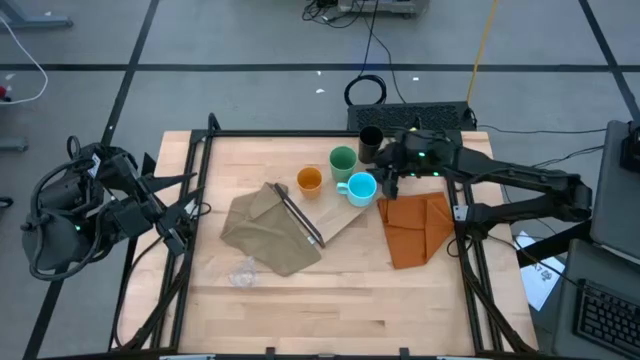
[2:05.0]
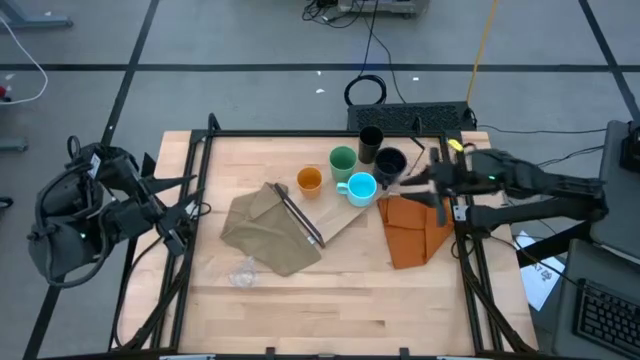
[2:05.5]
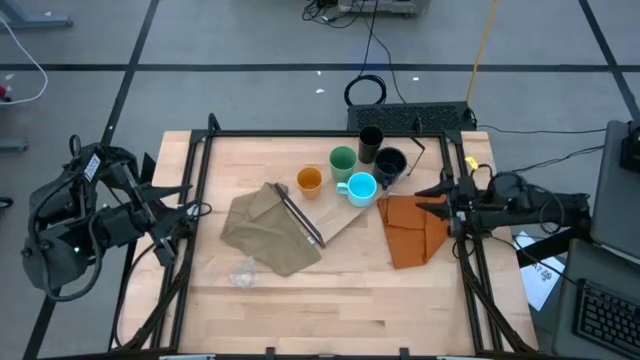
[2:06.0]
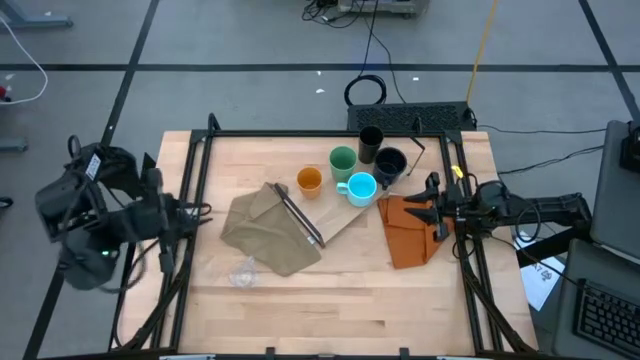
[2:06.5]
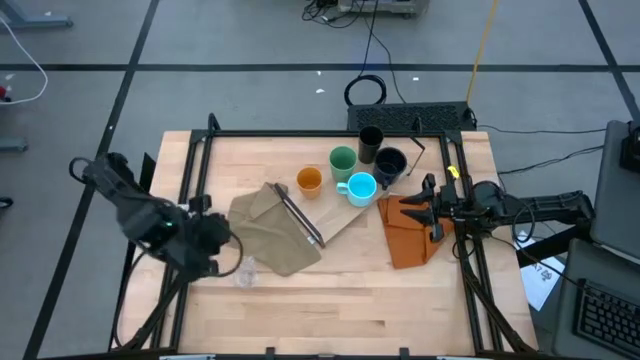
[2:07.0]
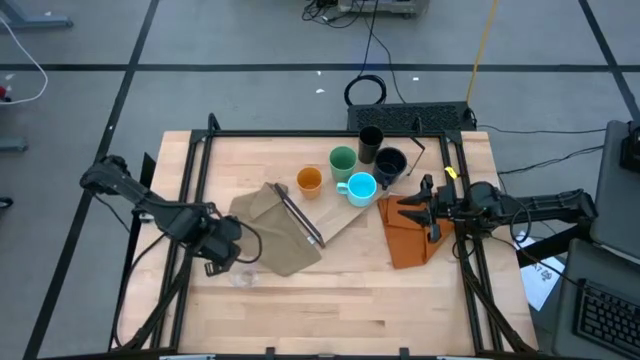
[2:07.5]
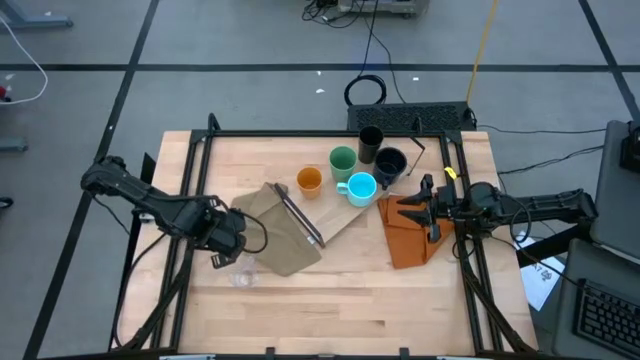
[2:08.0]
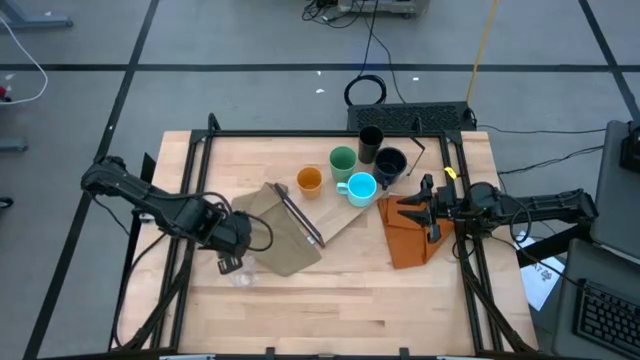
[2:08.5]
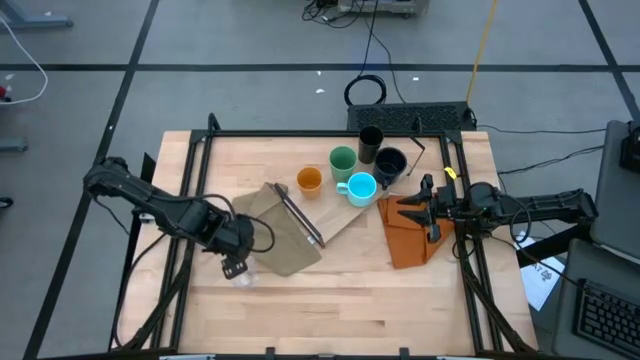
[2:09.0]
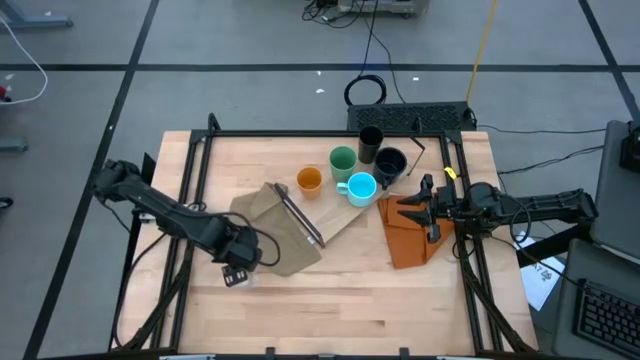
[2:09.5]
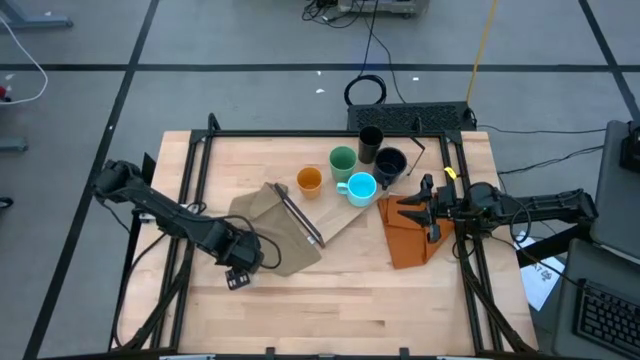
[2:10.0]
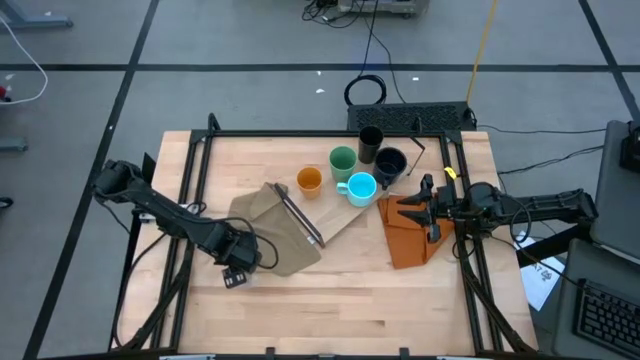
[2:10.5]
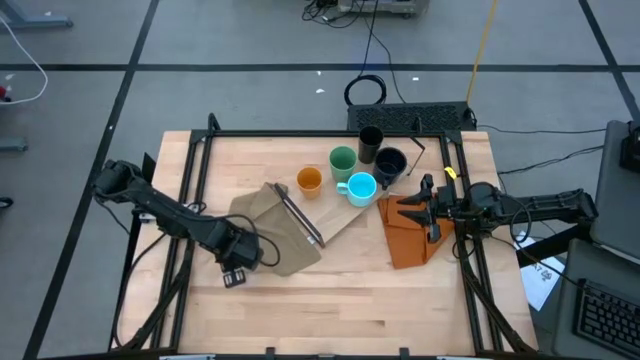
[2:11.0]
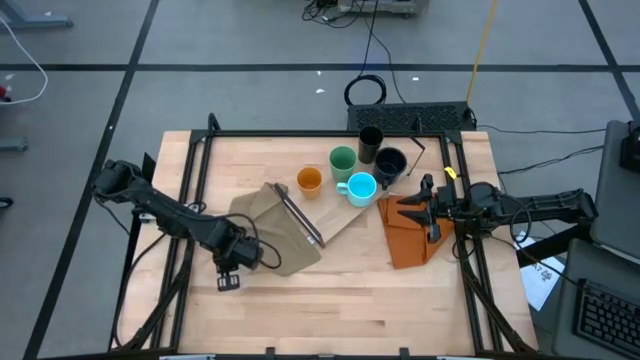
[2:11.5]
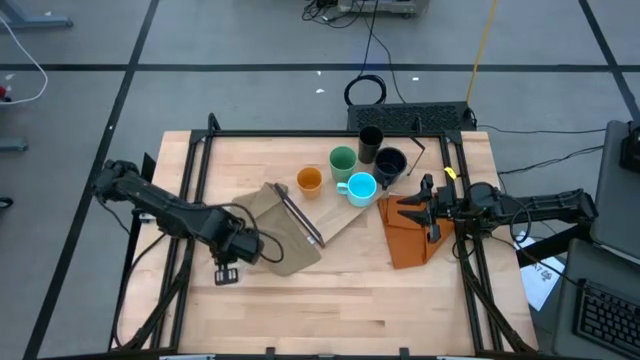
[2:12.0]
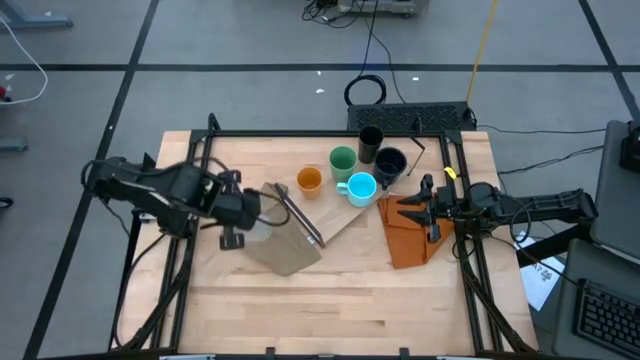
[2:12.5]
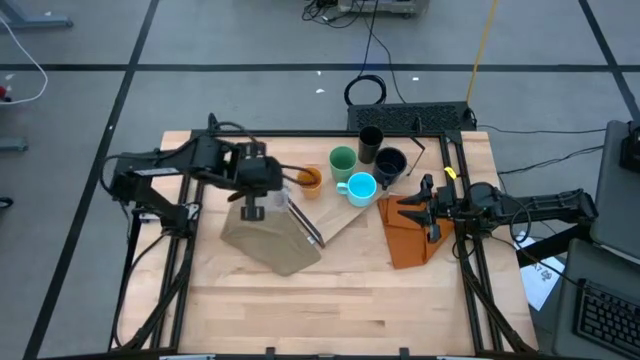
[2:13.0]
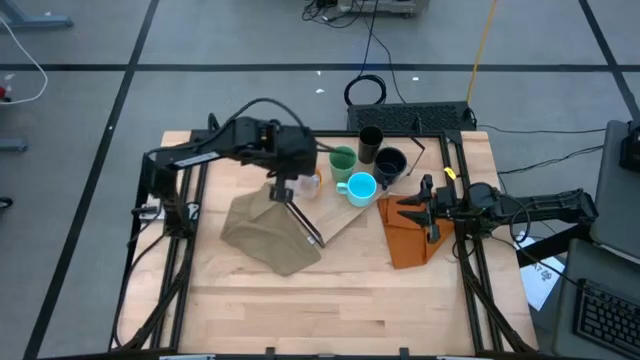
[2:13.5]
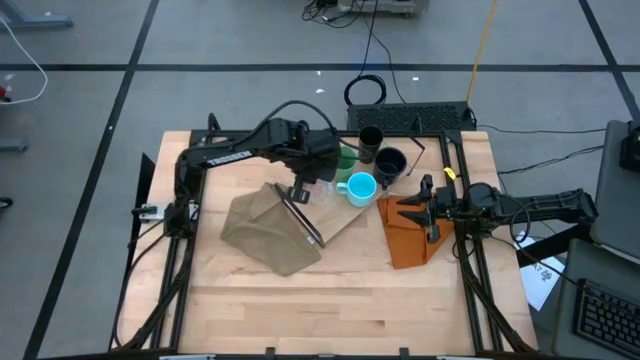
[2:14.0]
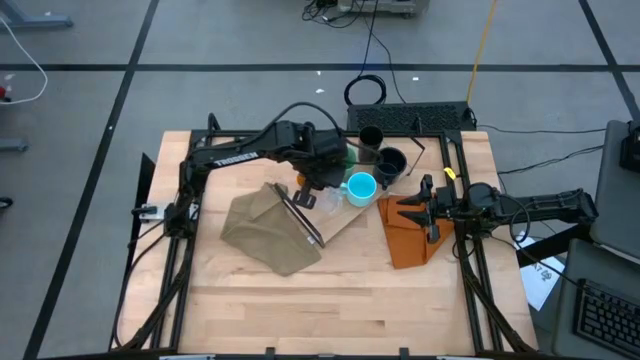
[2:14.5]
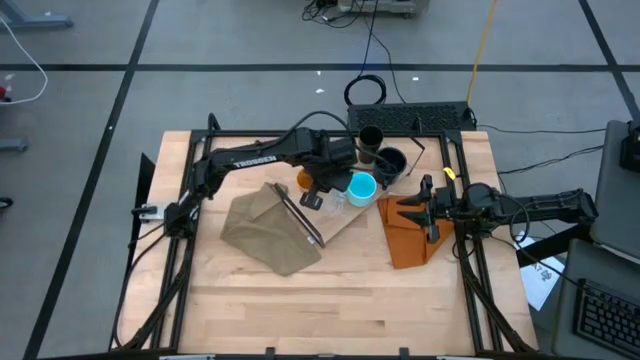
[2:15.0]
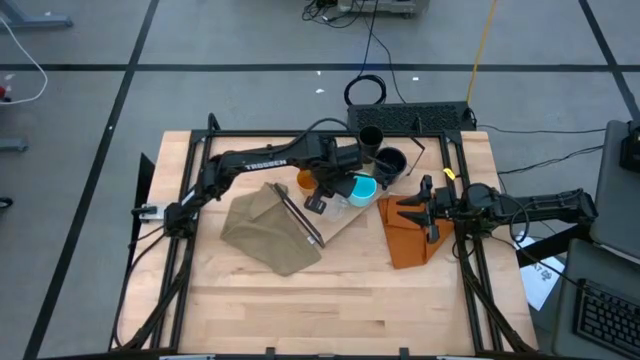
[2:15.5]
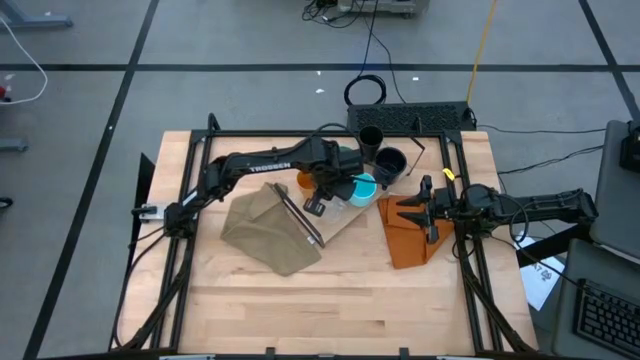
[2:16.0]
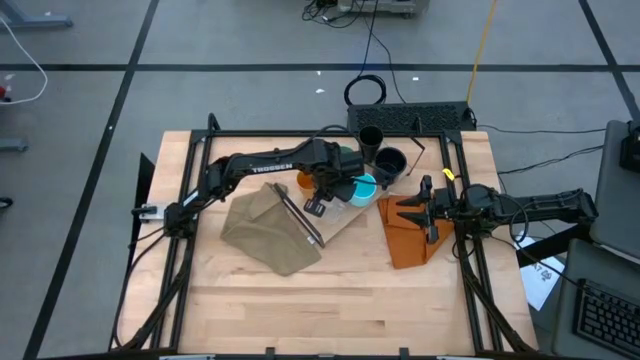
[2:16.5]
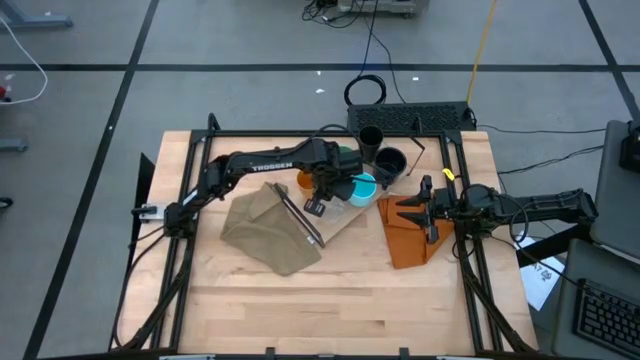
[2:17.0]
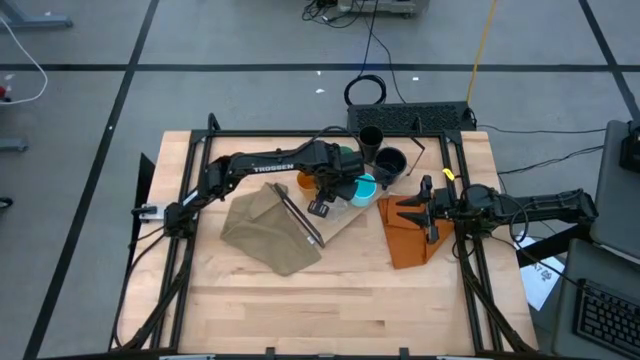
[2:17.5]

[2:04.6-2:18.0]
Task: Stack small to large cups/mugs on shelf
Put the transparent mug on the shelf

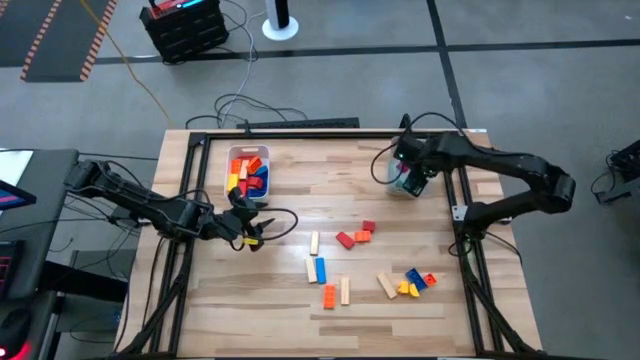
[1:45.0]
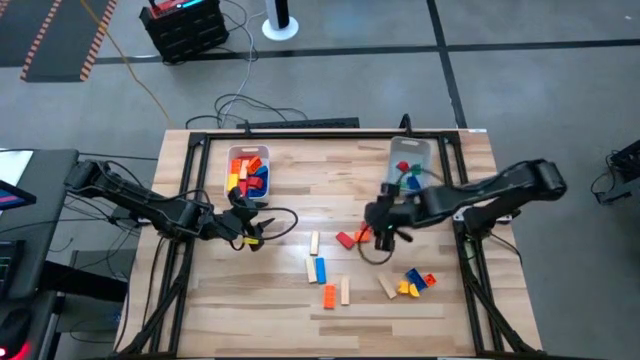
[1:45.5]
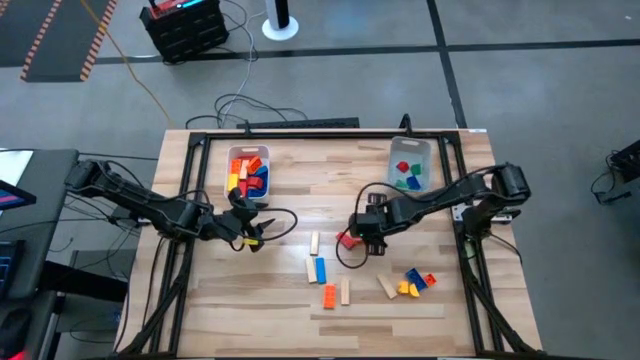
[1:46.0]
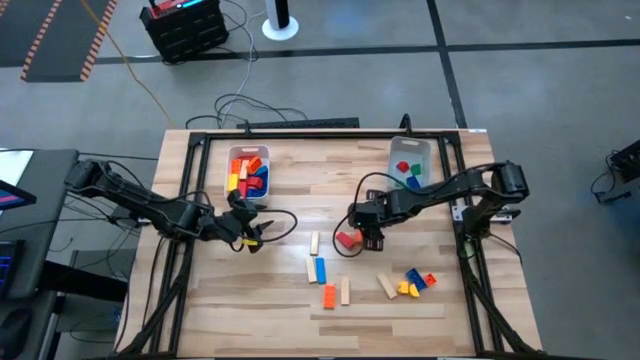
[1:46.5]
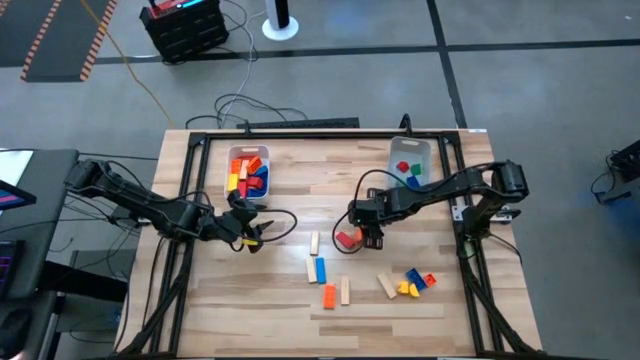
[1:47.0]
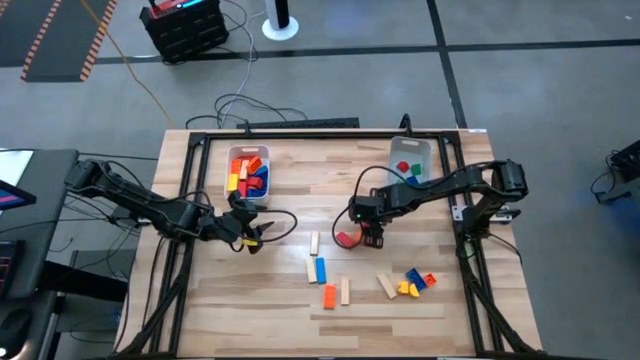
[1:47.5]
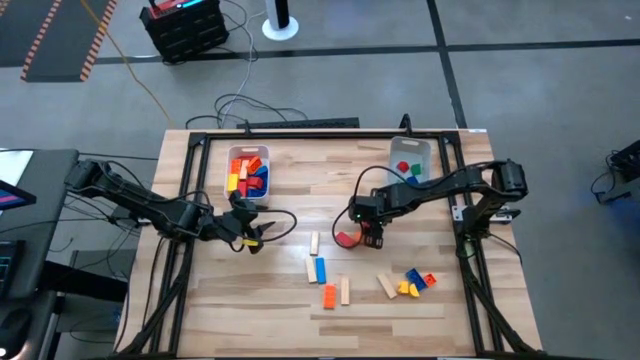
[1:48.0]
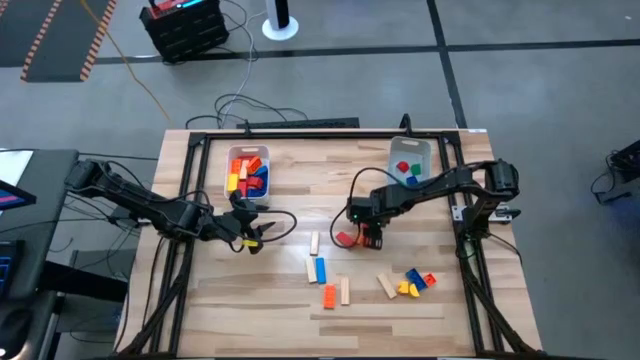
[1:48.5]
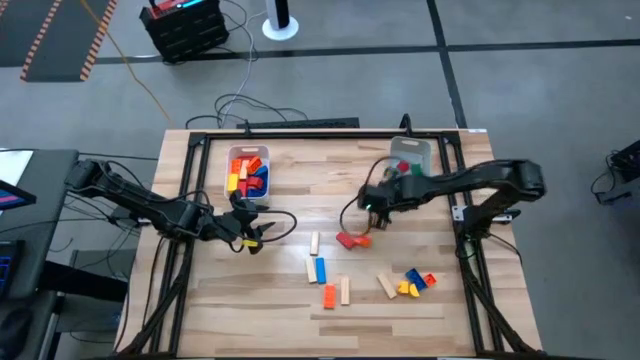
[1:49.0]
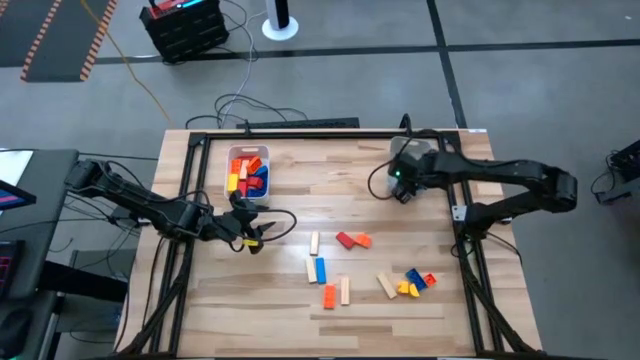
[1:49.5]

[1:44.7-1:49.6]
Task: Sort blocks by size
Put the small red block into the gray bin

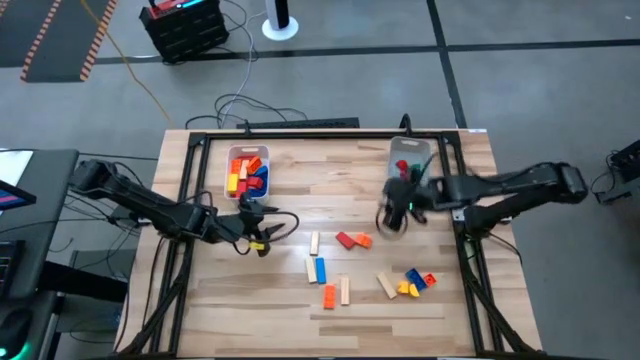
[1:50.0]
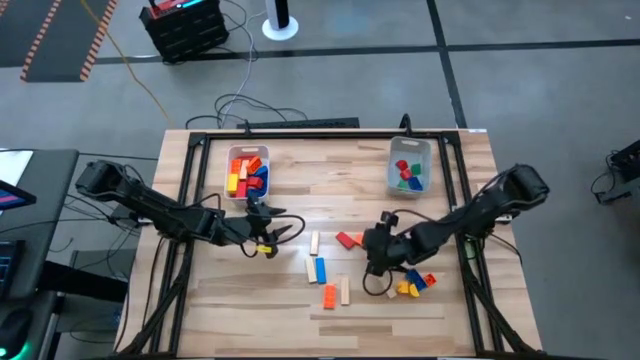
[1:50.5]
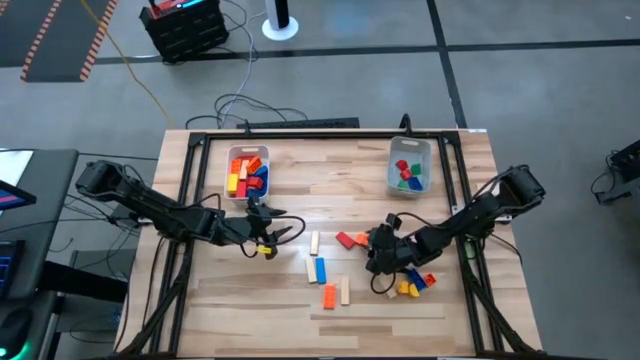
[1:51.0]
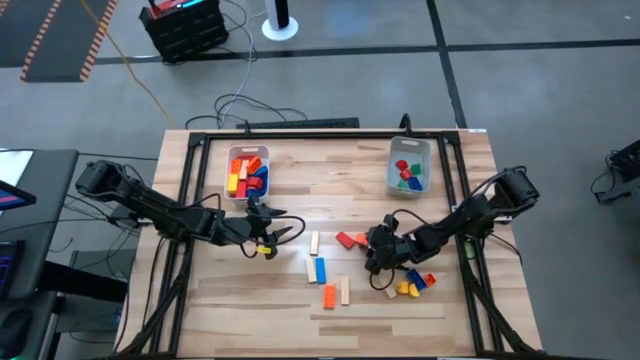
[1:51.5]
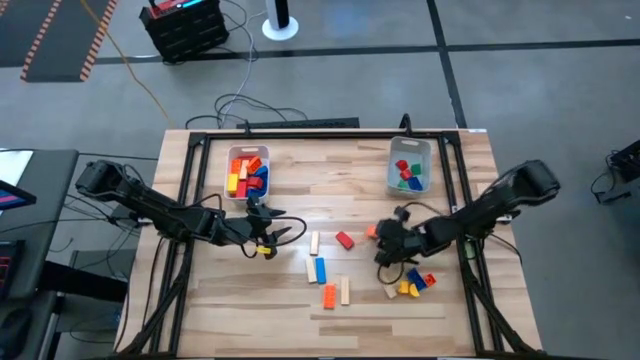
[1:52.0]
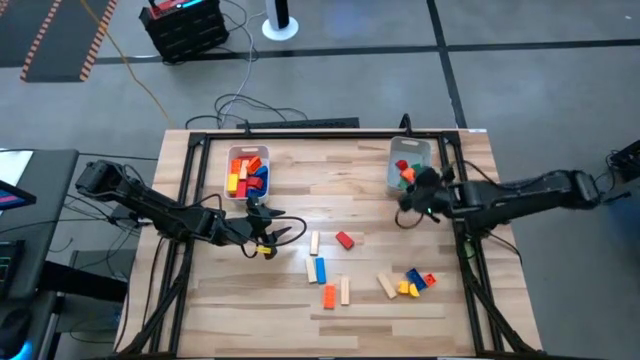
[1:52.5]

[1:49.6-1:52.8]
Put the small orange game piece into the gray bin

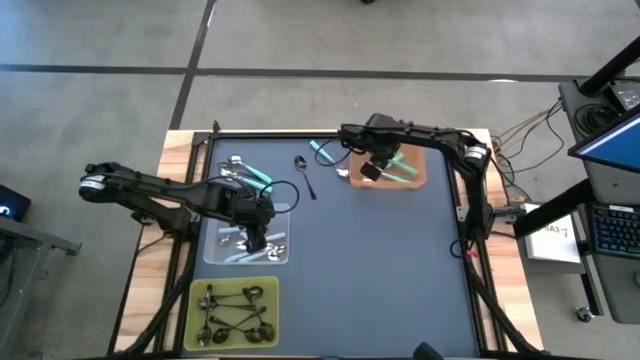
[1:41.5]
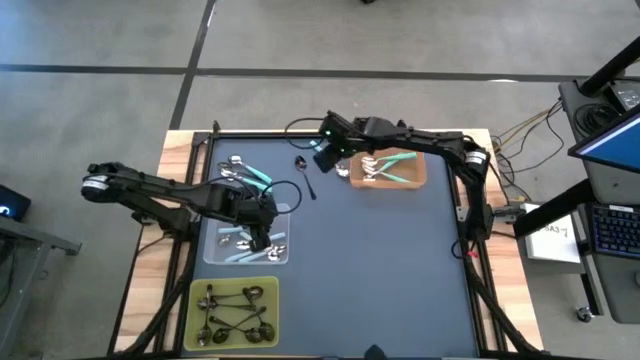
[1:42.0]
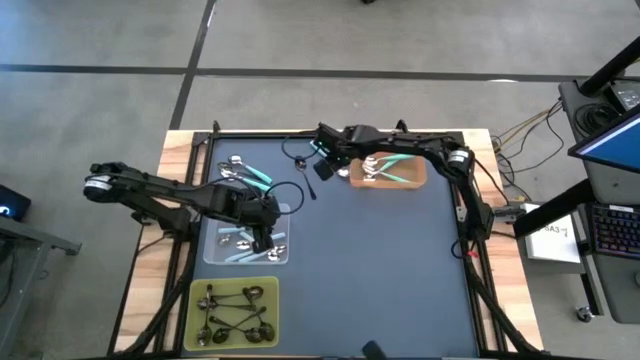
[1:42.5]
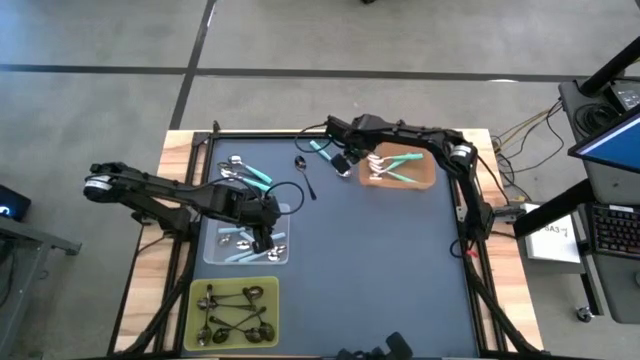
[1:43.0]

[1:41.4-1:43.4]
Task: Sort silverware by color (type)
Put the green spoon into the orange bin
